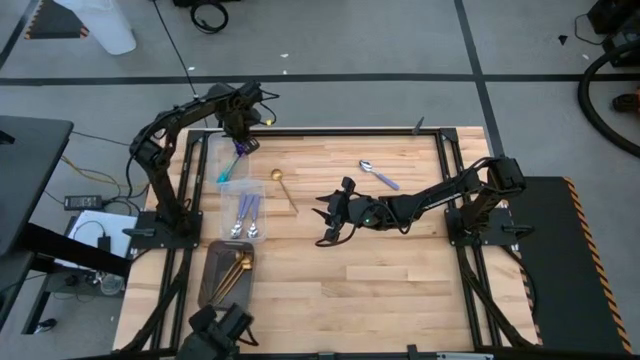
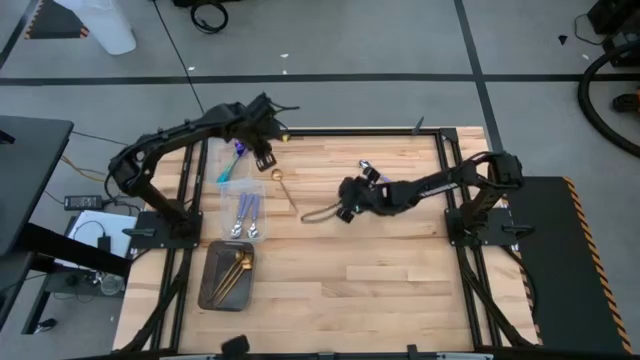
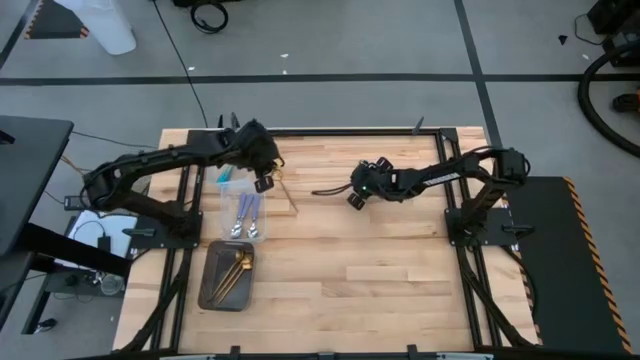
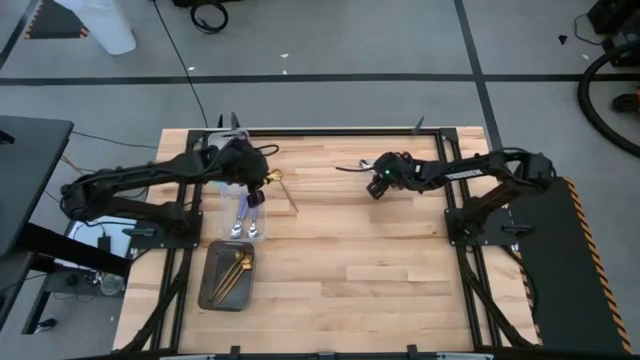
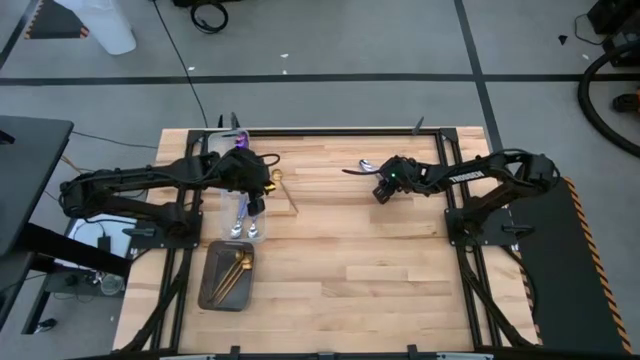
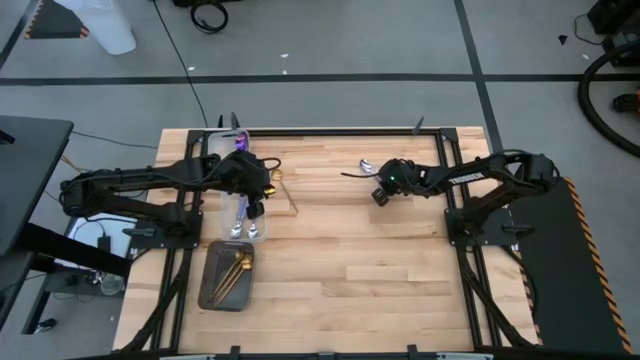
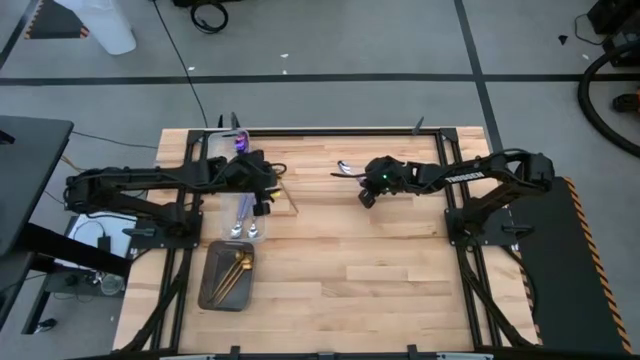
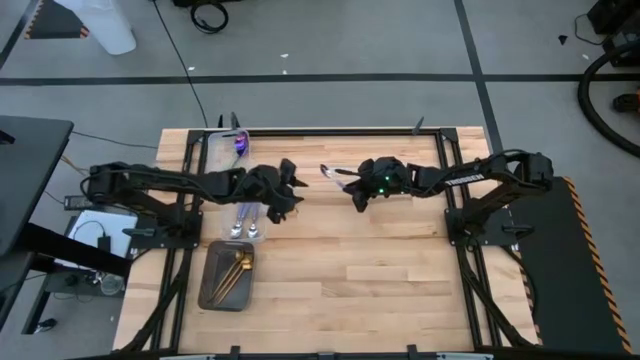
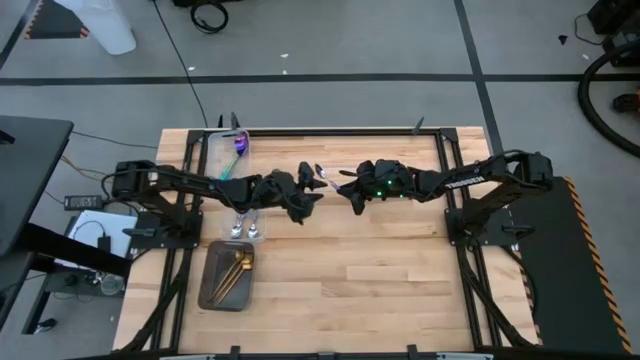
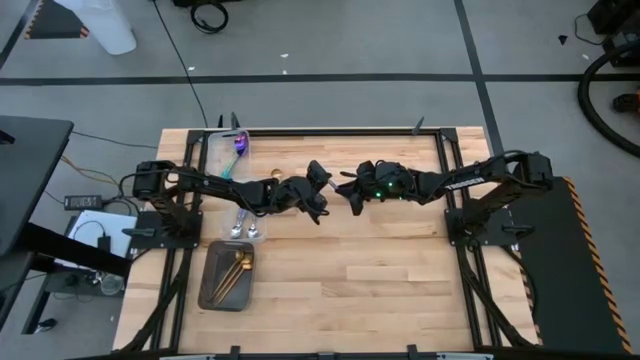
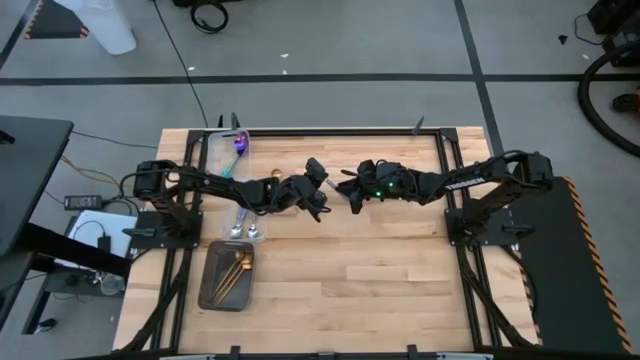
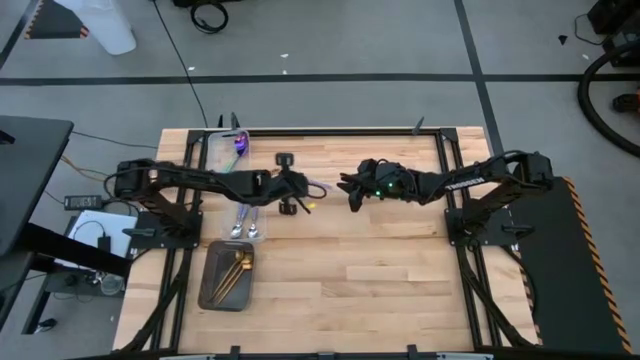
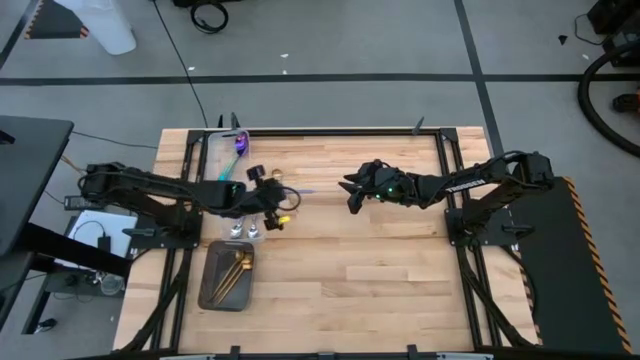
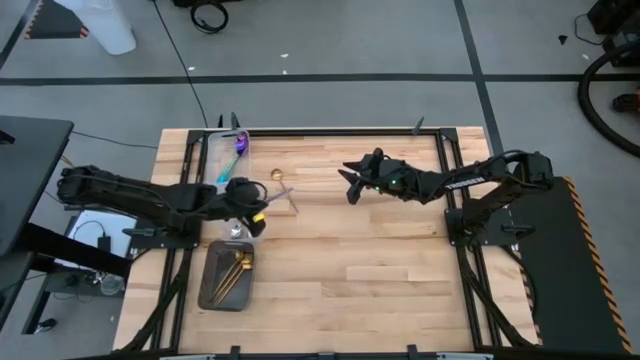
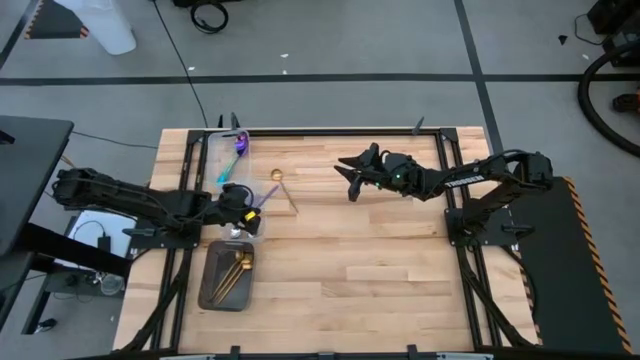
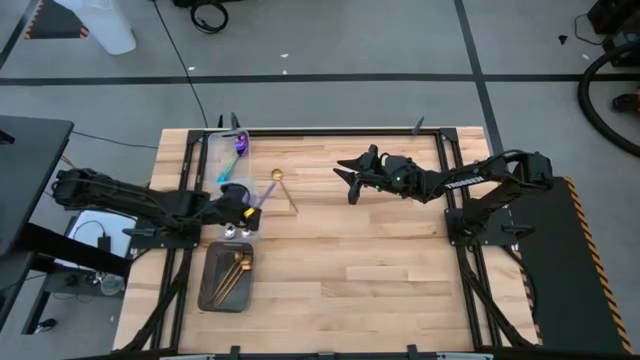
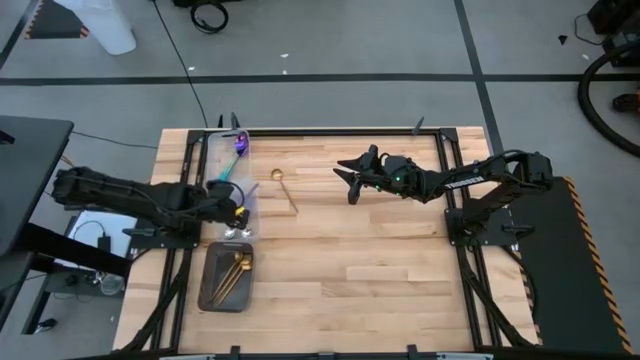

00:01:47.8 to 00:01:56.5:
Task: Sort silverware by color (type)
Put the blue spoon into the bottom transparent bin

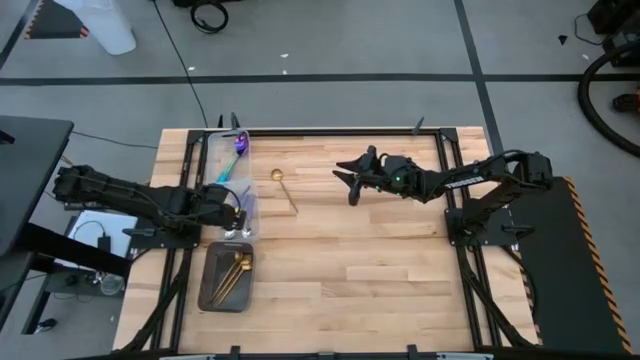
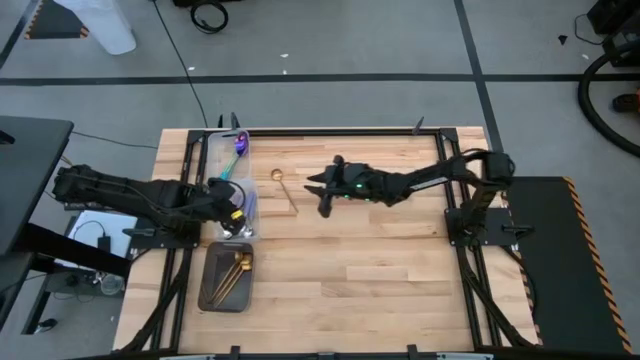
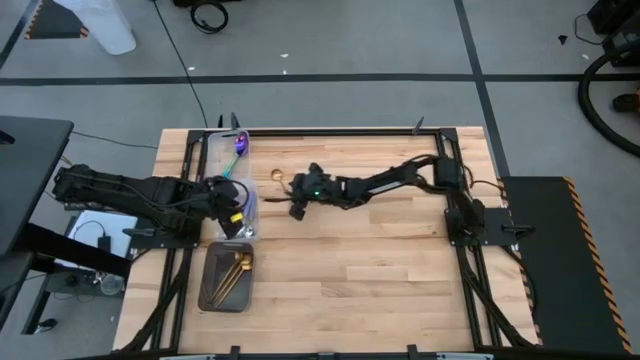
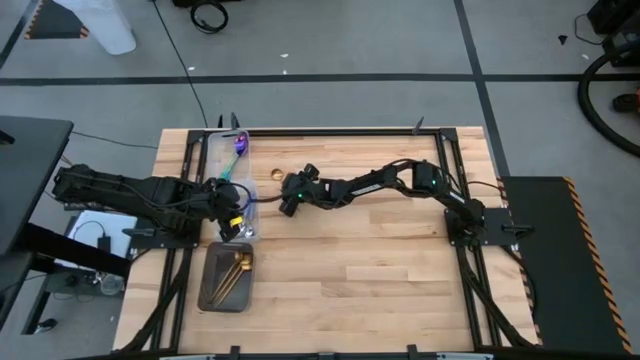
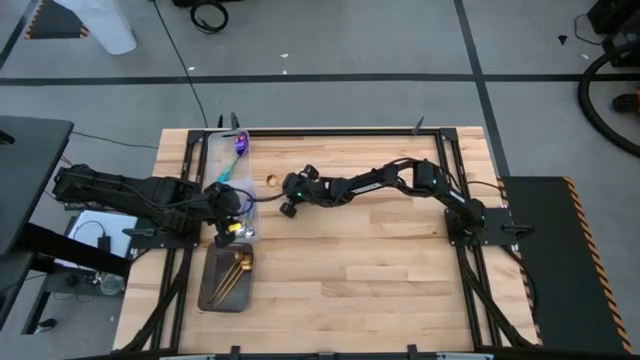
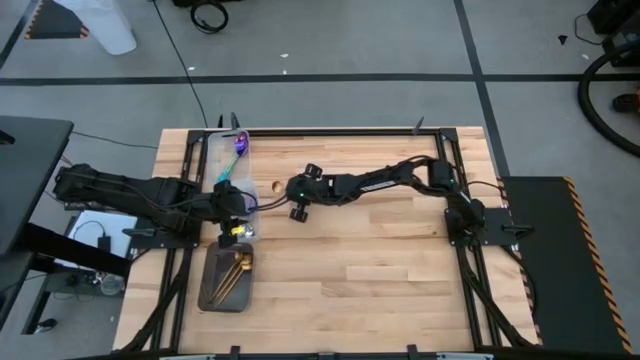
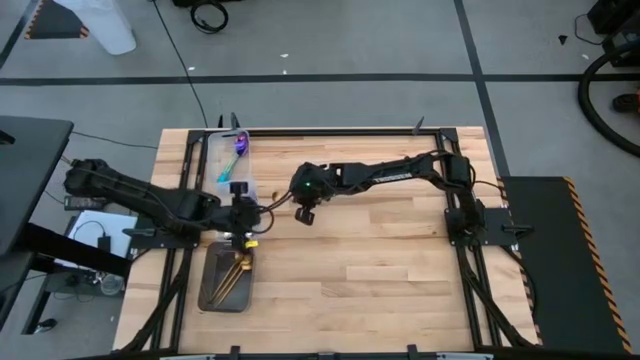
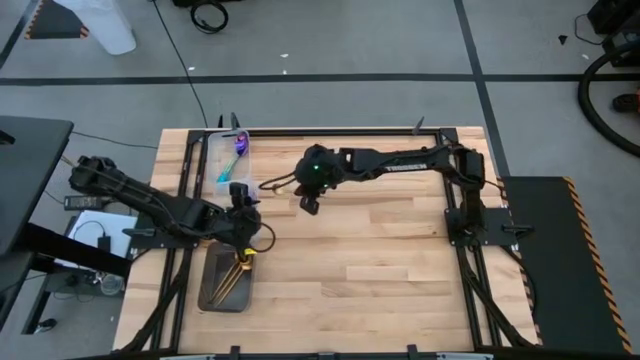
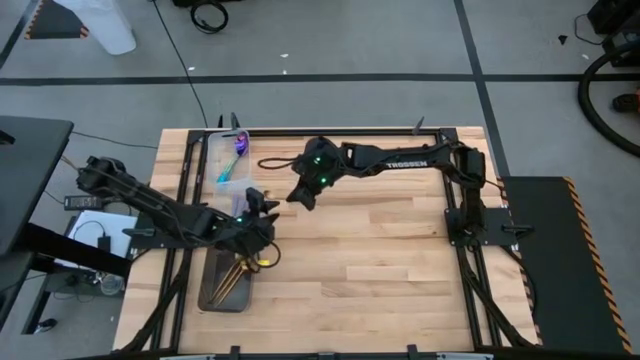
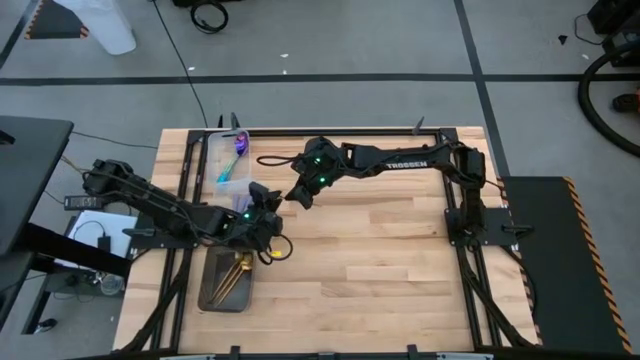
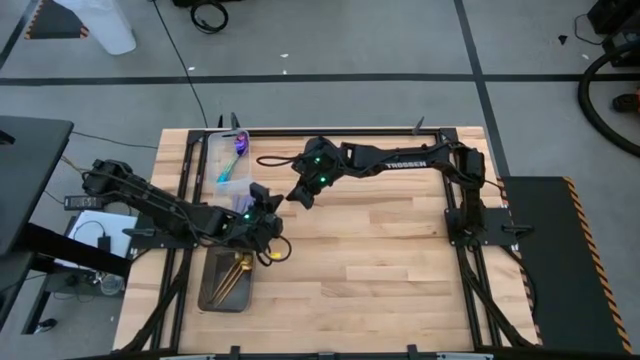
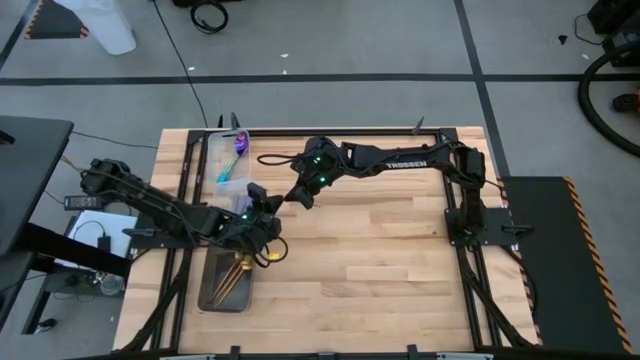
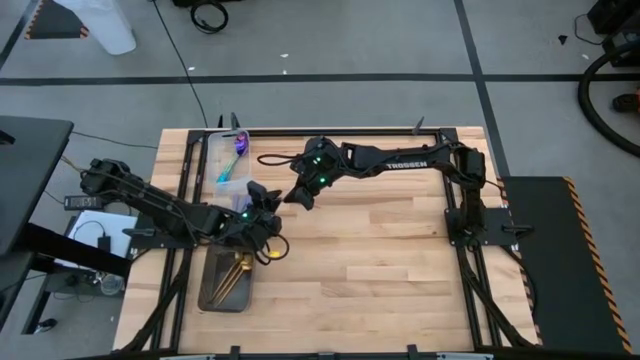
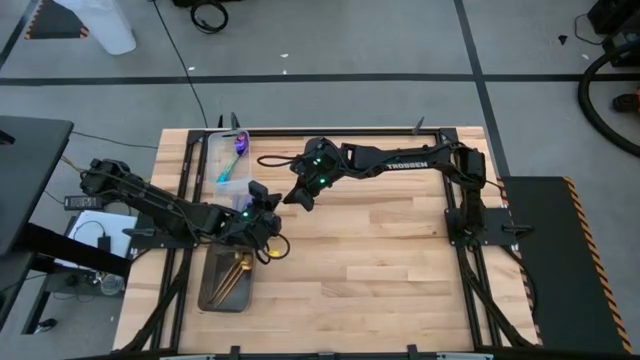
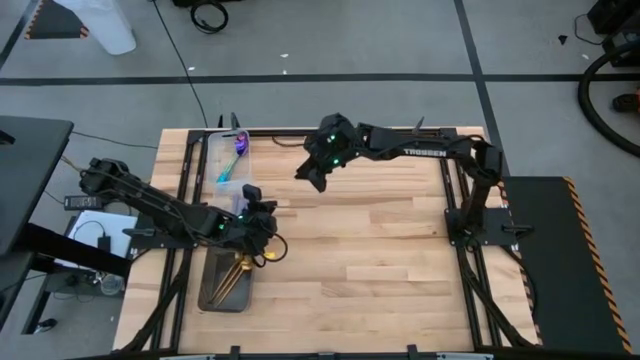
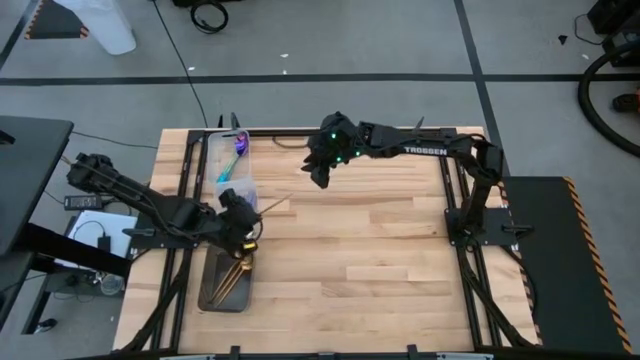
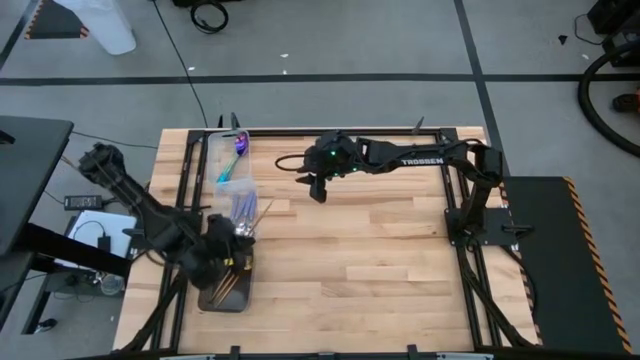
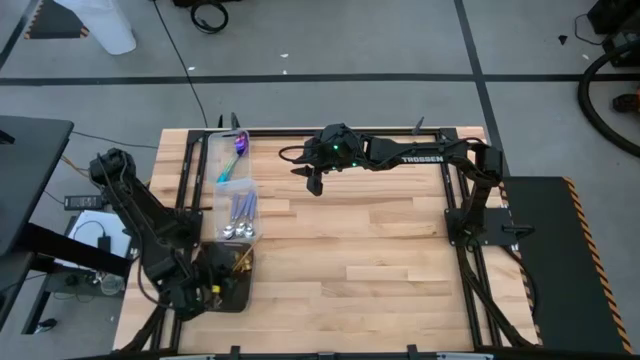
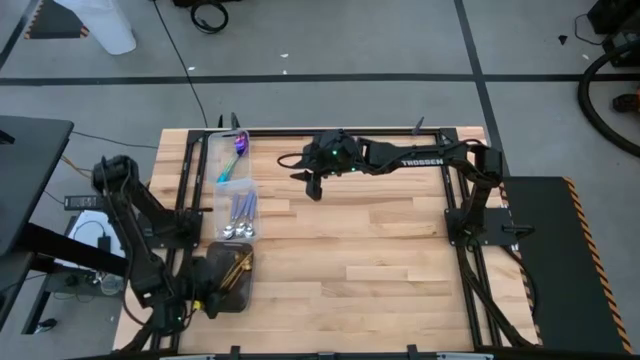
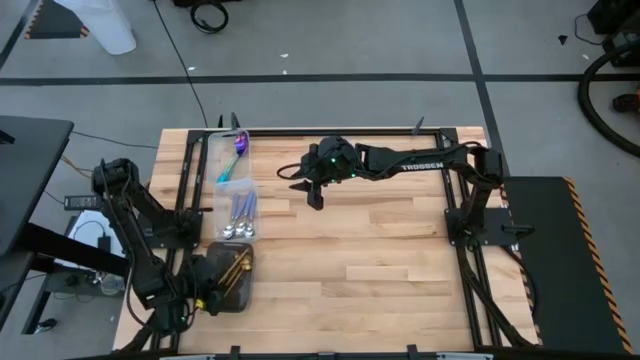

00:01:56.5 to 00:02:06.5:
Put the gold spoon into the black bin
